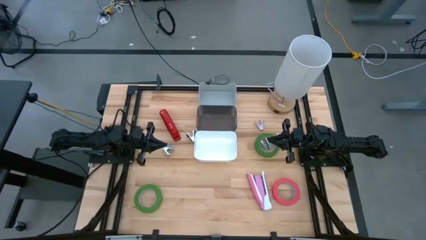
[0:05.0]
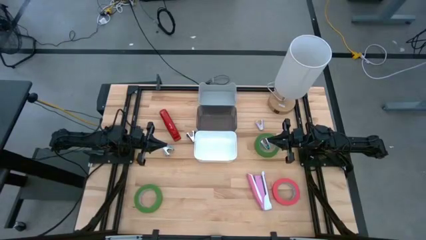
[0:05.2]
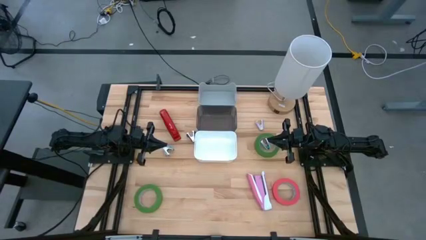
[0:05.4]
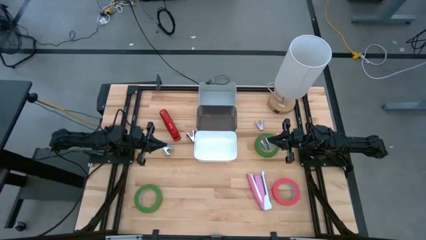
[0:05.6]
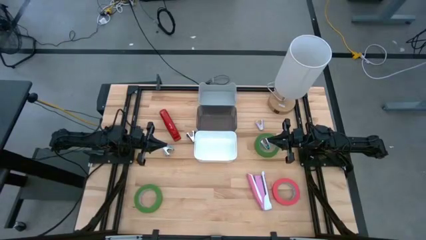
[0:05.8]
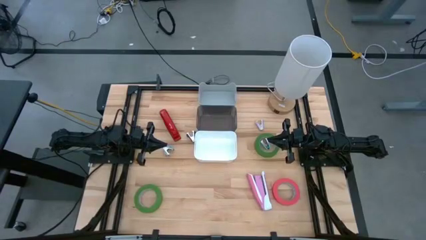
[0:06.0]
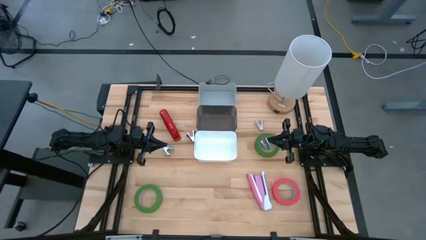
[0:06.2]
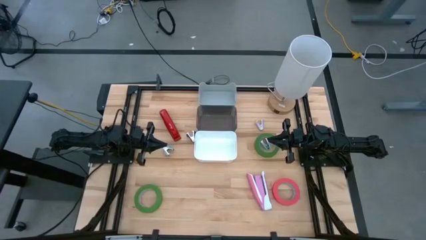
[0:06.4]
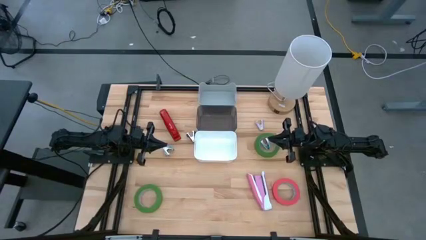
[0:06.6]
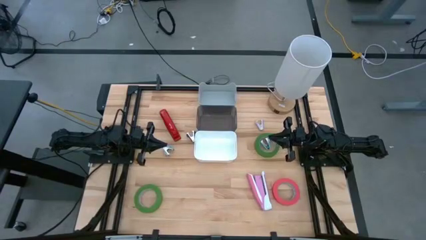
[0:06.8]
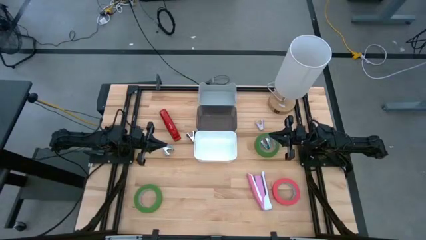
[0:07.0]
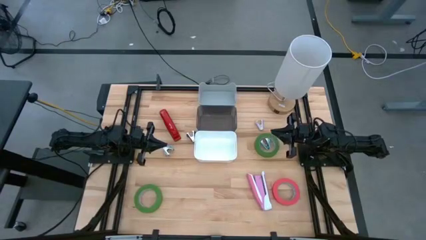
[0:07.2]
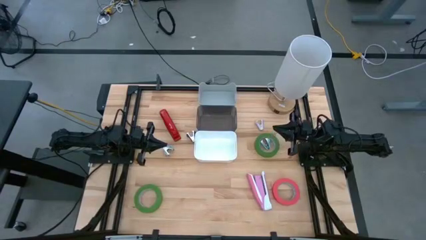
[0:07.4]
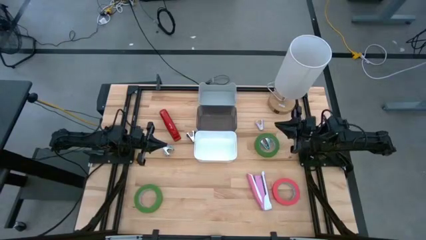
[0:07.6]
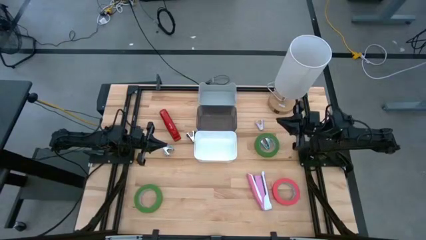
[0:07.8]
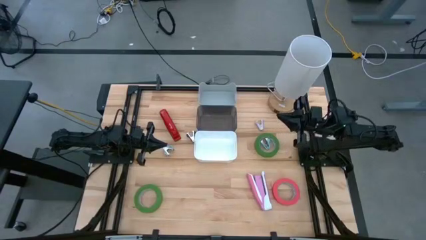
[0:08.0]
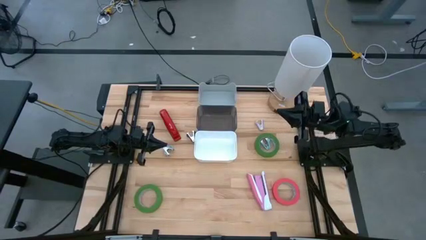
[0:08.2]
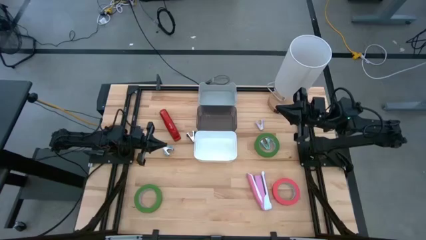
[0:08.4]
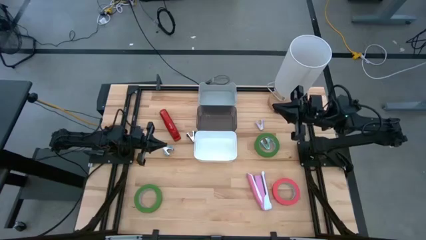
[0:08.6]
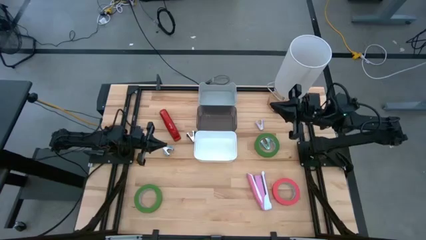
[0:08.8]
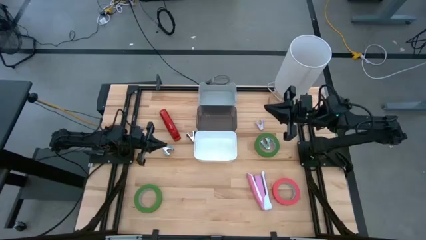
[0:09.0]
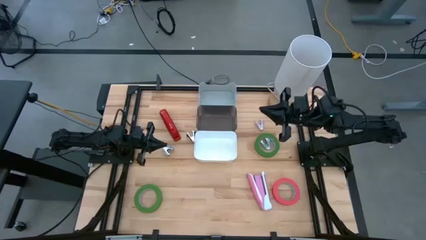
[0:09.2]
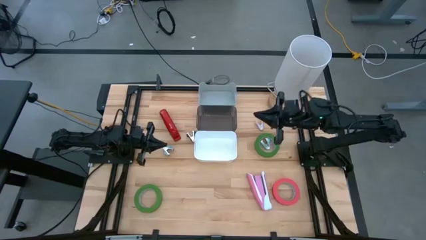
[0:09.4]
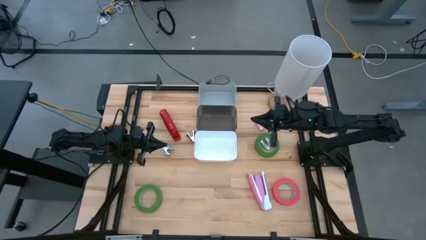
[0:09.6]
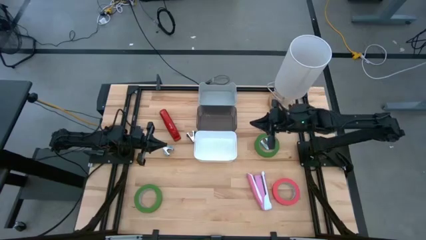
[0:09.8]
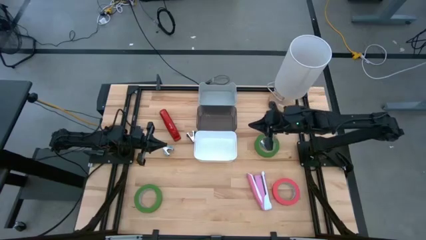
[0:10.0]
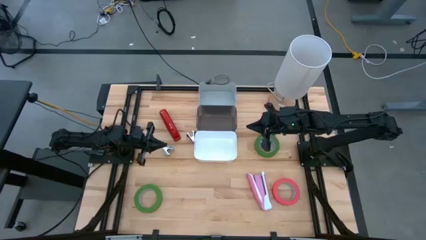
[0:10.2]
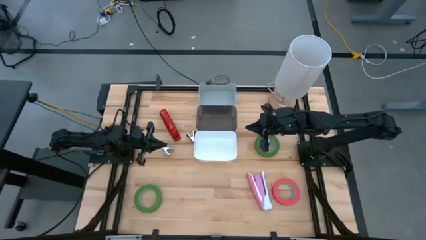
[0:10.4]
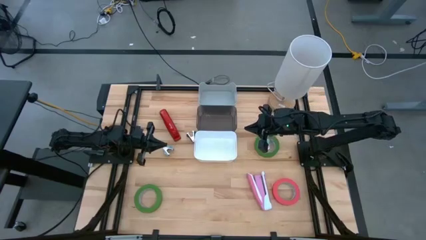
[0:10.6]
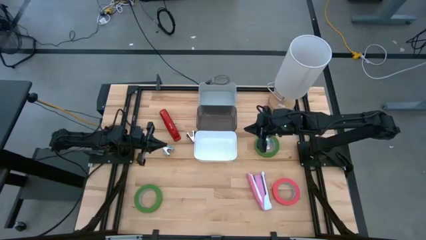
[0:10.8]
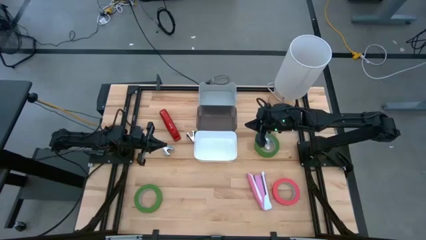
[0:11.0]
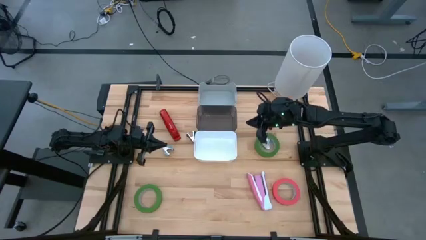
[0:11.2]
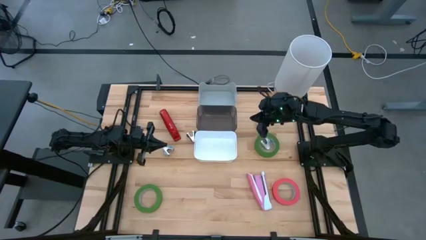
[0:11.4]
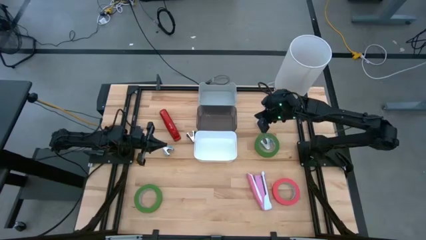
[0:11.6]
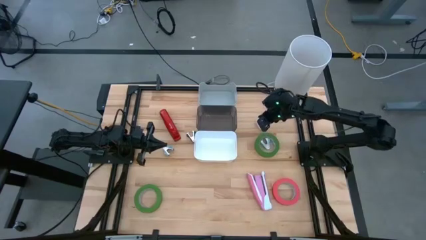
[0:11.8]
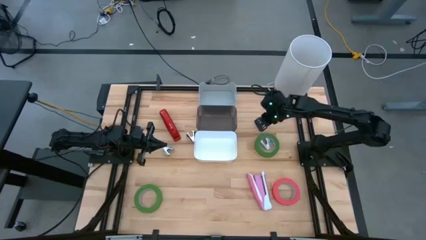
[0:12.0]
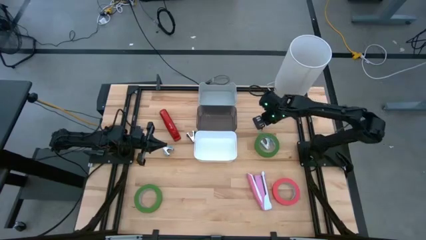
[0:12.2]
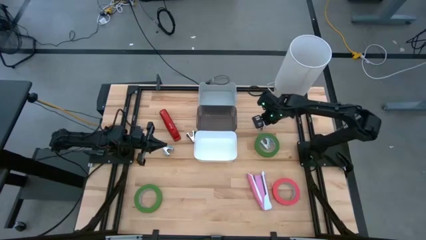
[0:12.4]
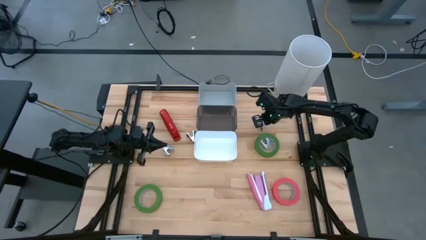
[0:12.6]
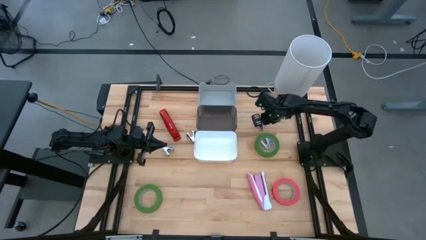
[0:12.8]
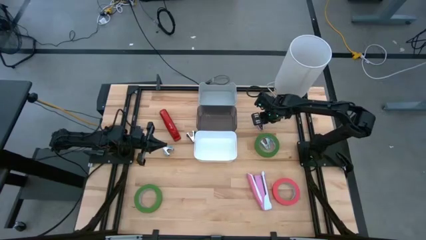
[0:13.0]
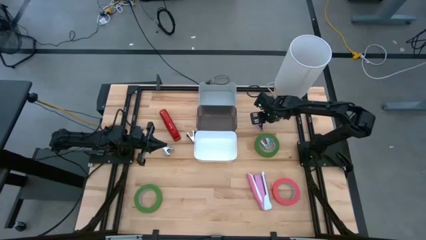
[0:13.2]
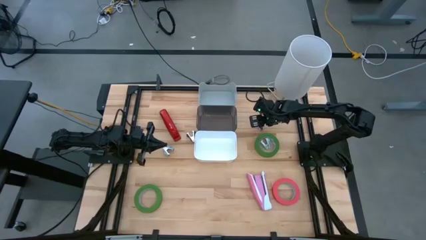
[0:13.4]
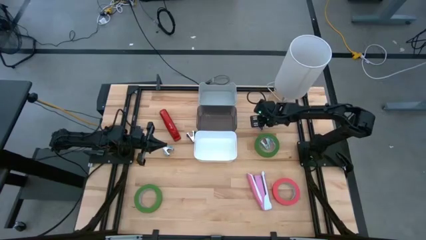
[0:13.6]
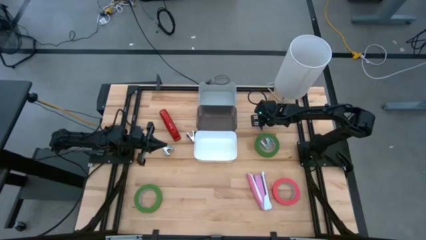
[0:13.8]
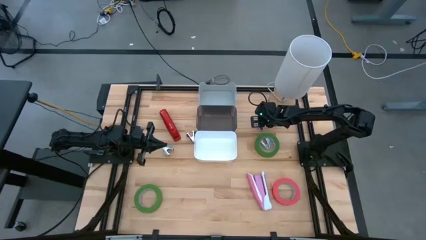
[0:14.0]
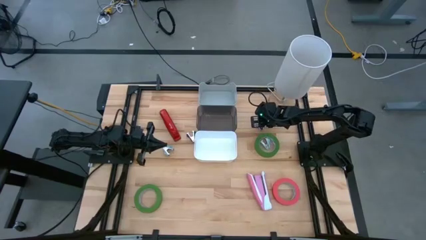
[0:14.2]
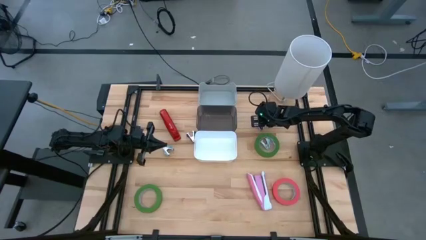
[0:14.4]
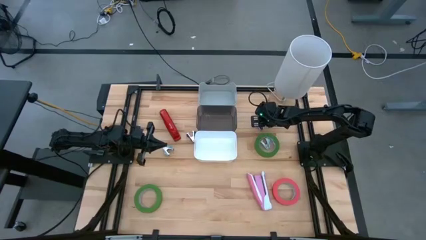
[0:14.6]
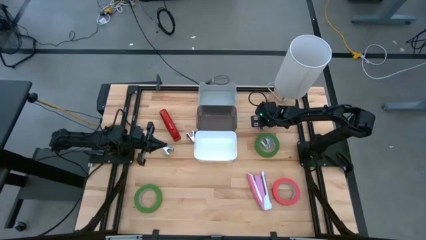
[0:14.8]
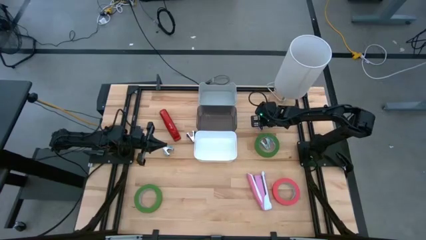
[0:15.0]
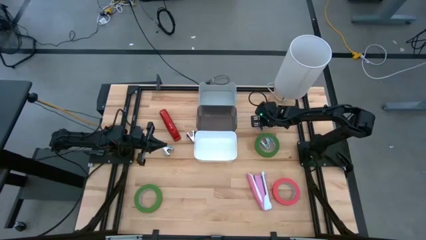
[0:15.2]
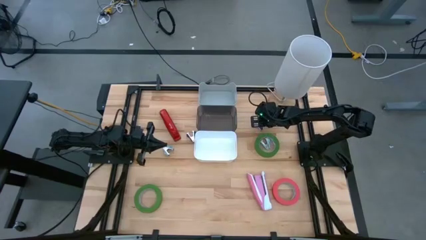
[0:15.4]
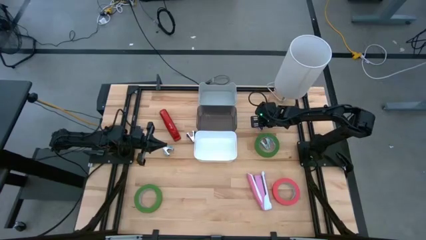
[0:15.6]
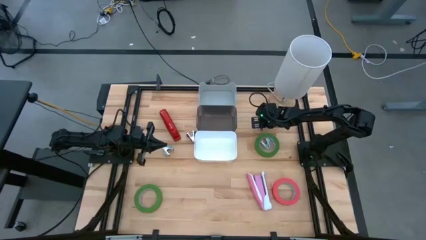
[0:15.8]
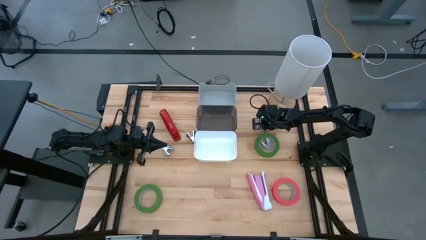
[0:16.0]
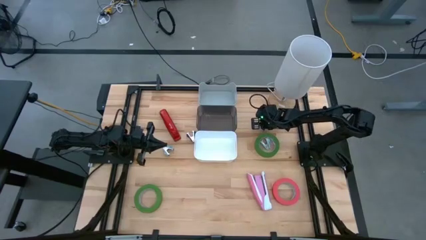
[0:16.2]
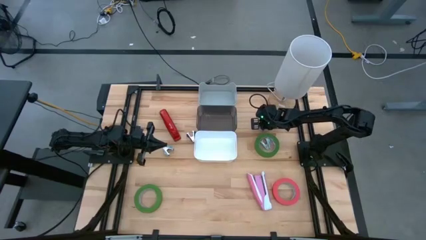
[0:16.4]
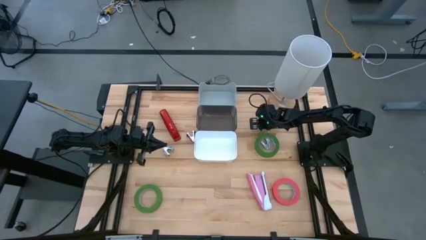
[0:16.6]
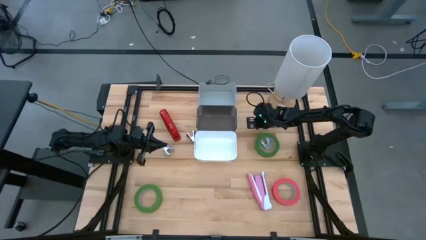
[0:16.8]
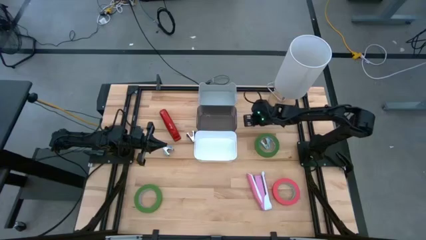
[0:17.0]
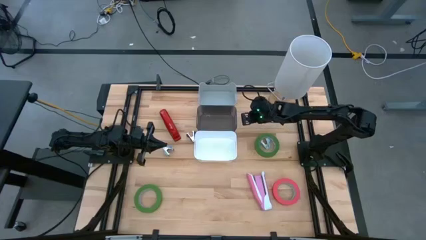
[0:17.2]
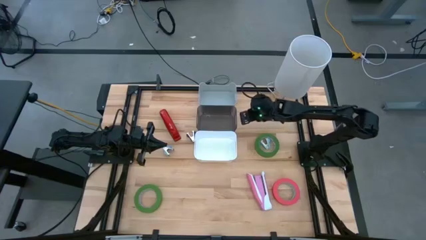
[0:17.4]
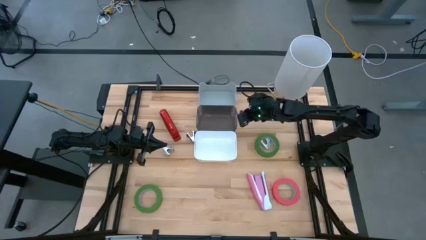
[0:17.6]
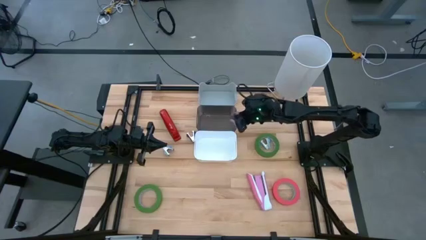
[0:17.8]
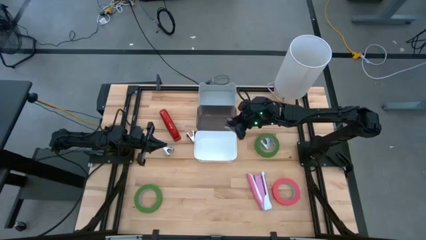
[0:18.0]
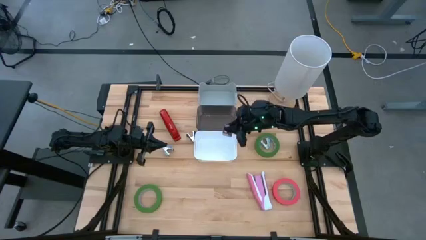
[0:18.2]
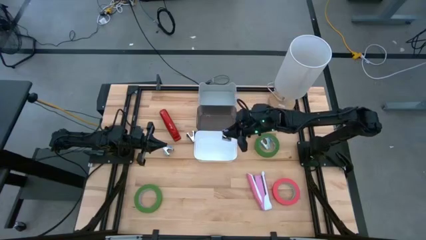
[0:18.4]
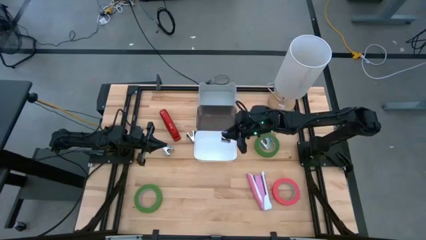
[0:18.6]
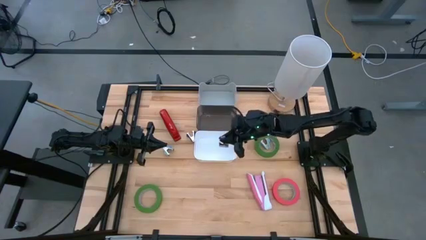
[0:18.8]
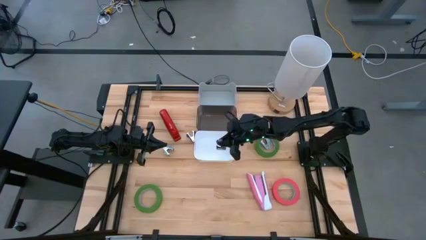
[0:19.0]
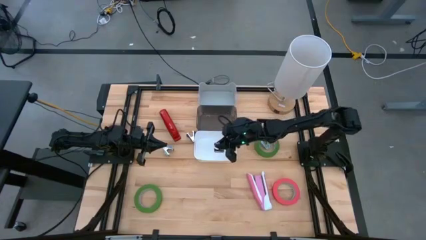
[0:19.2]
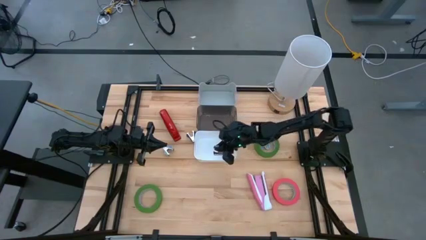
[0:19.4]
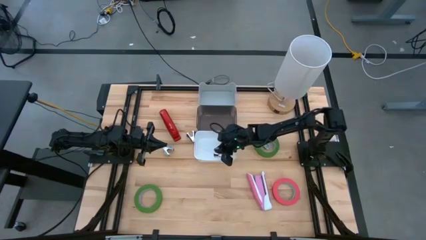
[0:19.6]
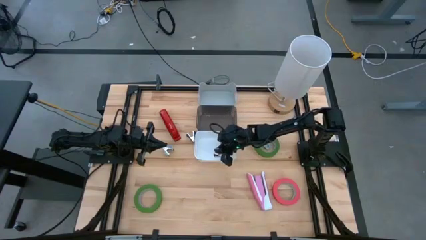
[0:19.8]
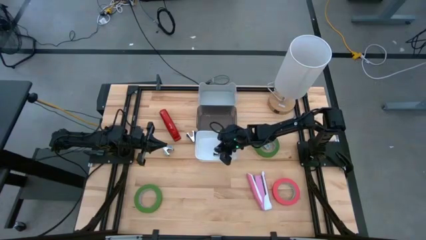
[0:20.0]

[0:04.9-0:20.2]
Task: Pick and place Stapler, Stapler remover, tape
Put the purple staple remover in the white bin
